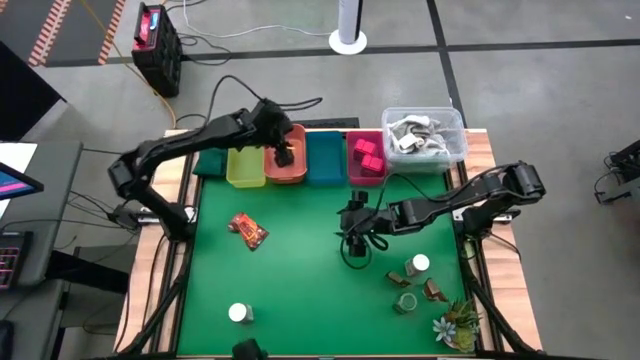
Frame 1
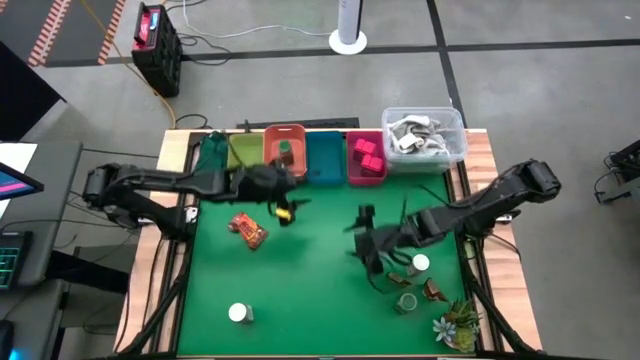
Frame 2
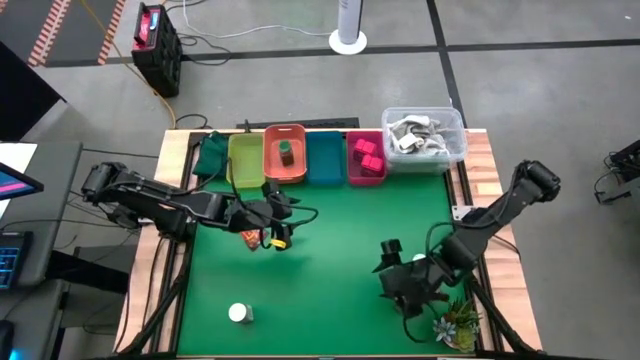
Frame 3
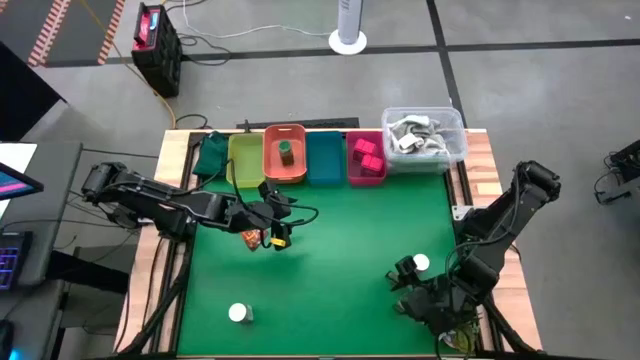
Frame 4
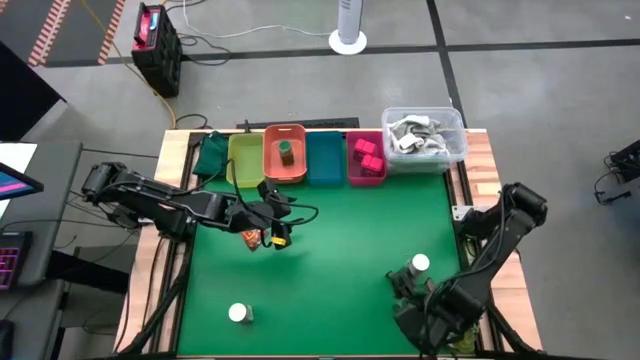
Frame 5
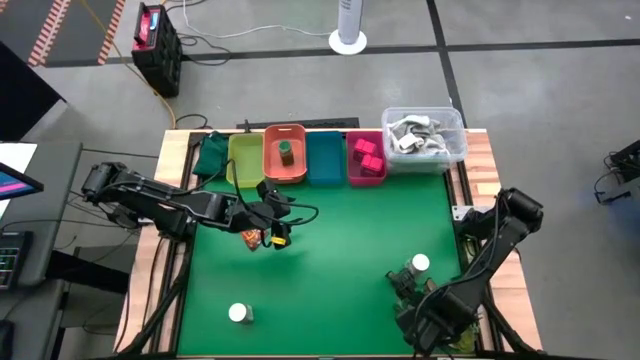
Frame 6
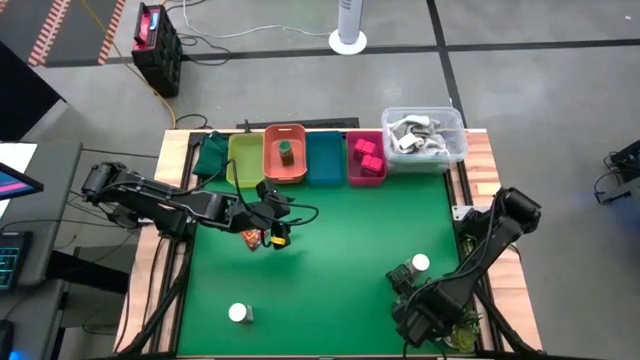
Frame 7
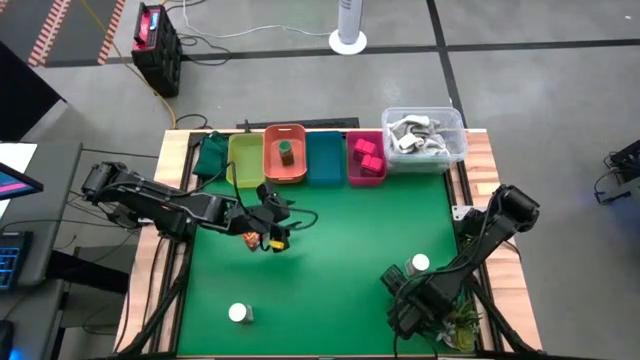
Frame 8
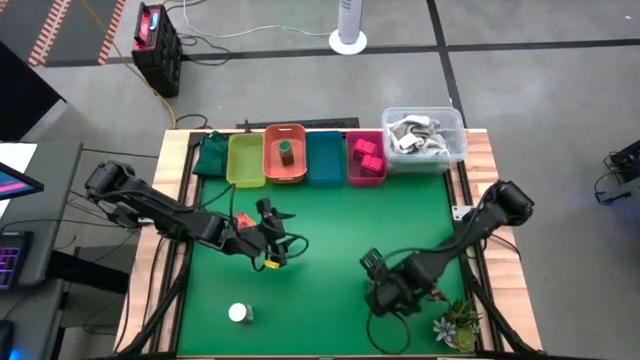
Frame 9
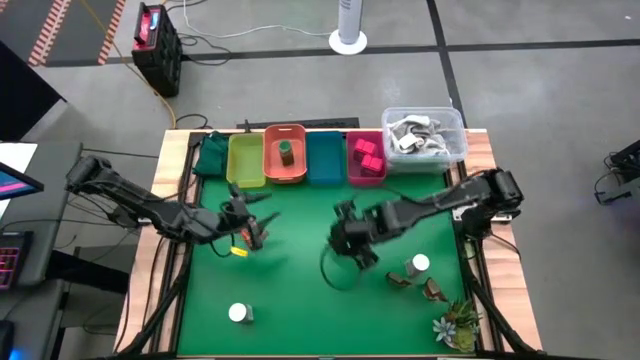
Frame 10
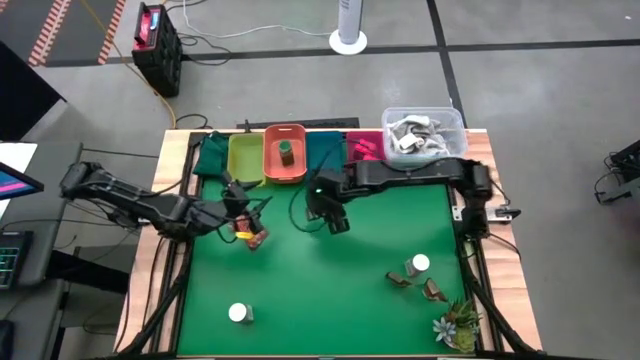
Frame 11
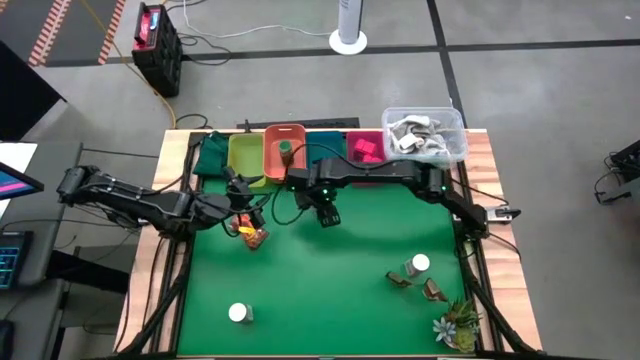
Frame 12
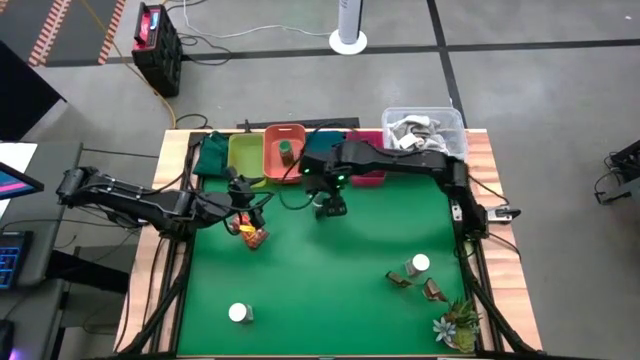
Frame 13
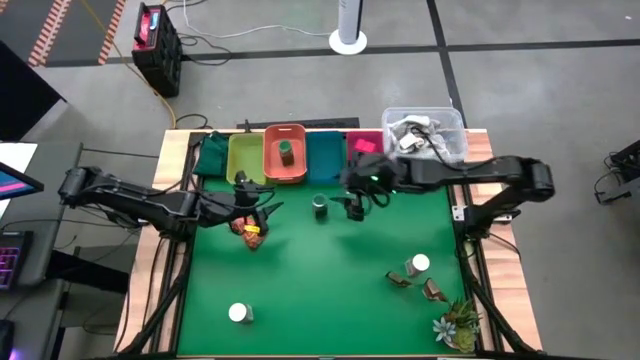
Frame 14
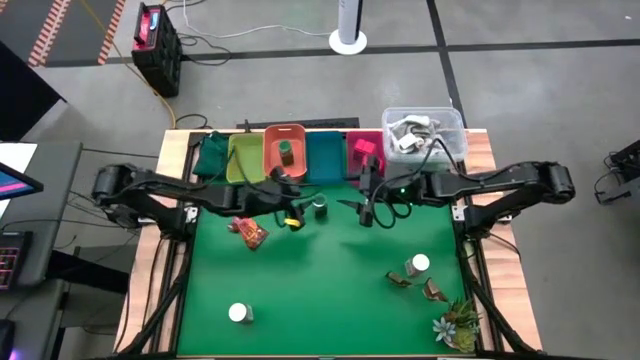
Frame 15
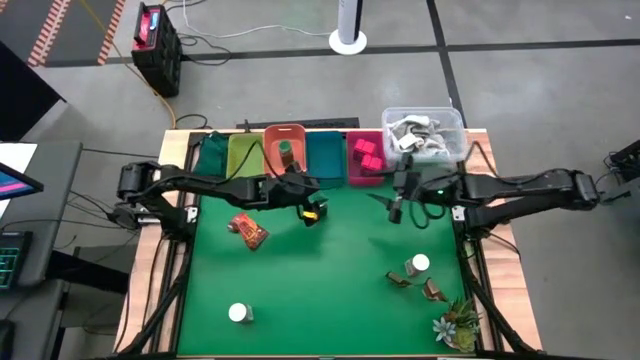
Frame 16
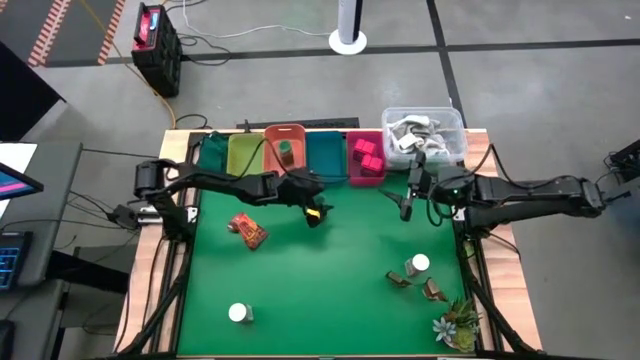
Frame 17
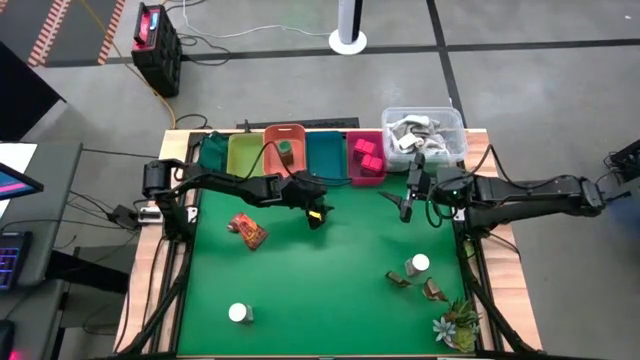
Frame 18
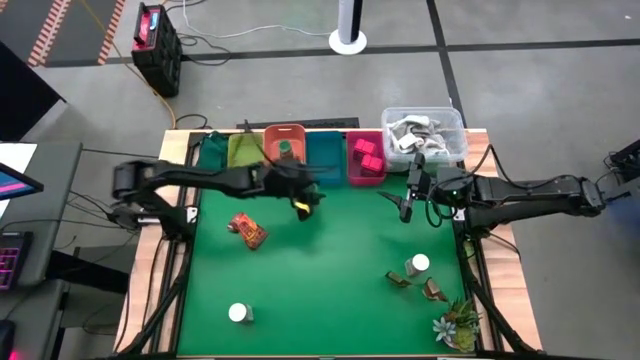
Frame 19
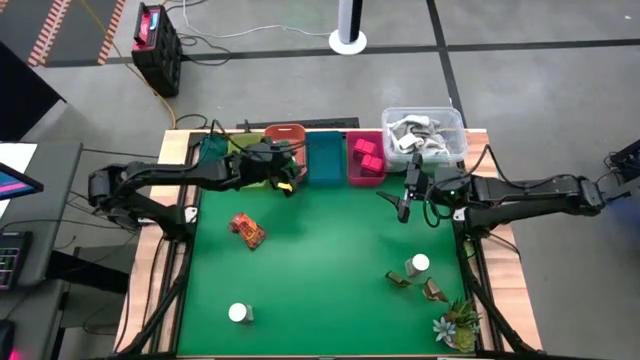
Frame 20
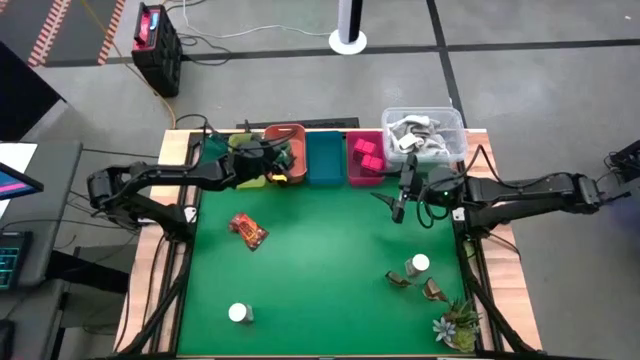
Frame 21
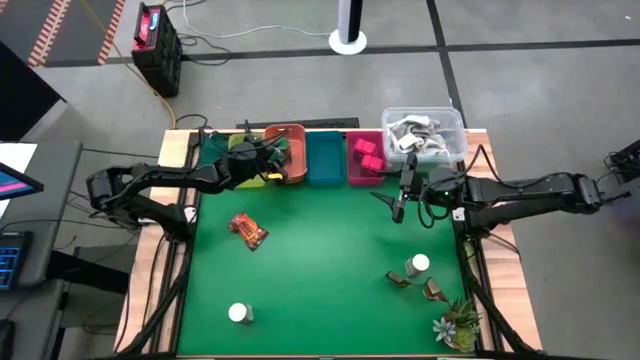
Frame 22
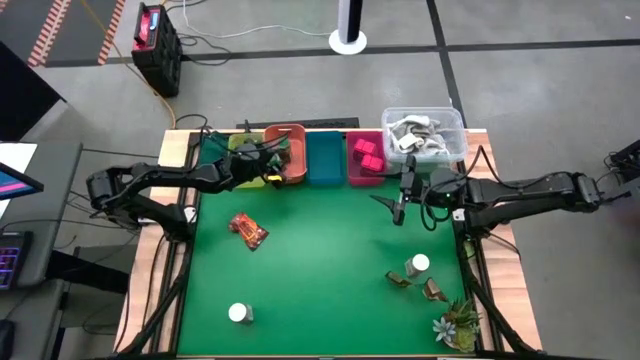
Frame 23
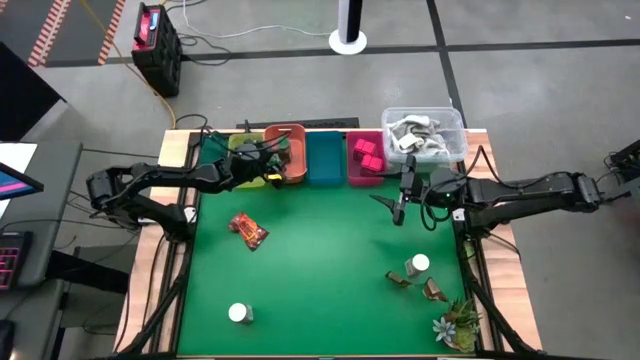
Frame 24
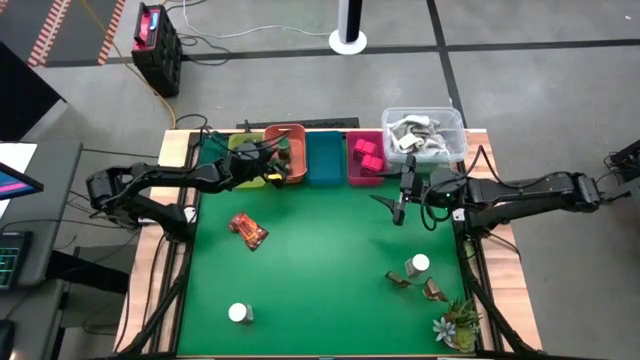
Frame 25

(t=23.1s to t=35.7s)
Task: Sort spices by type
Put the green spice bottle into the orange bin

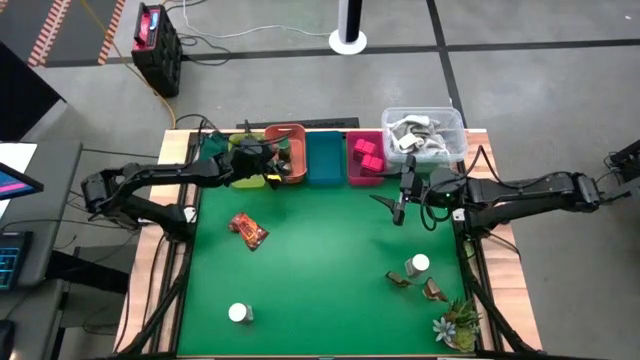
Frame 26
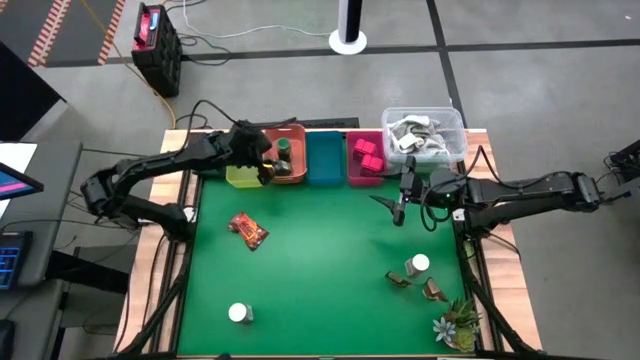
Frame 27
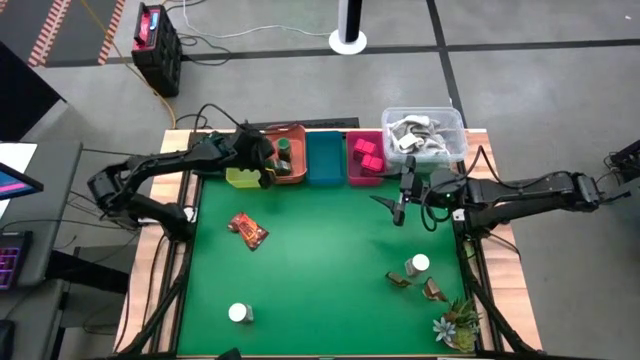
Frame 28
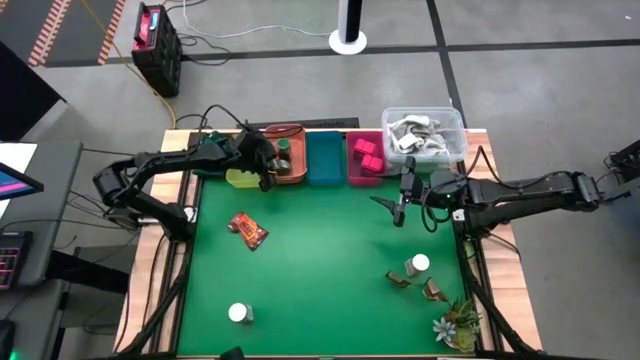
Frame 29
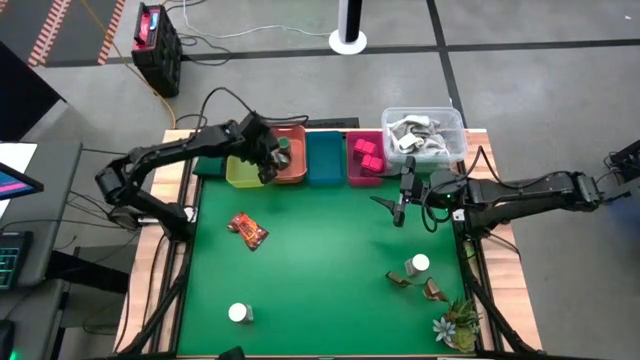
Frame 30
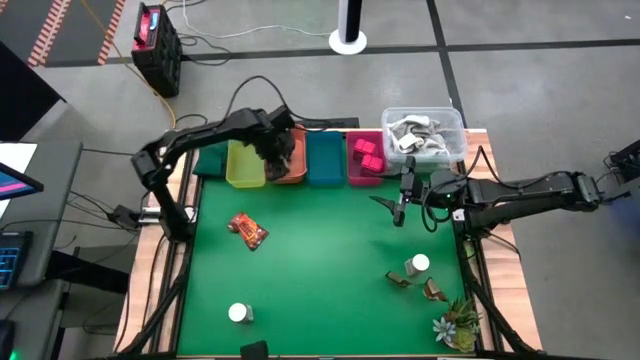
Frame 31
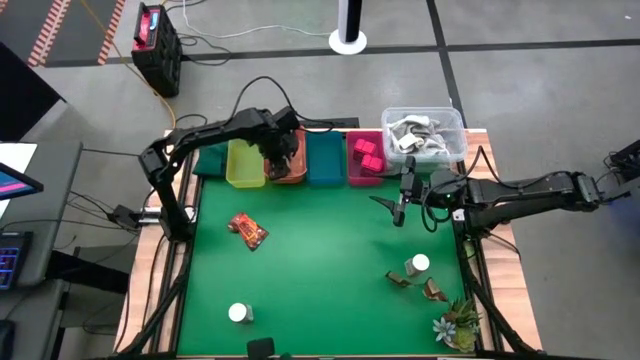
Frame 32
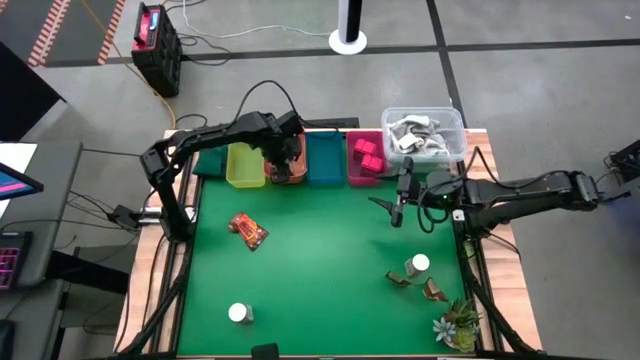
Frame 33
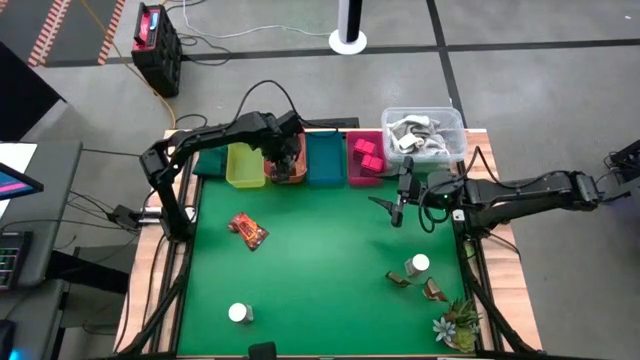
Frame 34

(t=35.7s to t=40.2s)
Put the green spice bottle into the orange bin

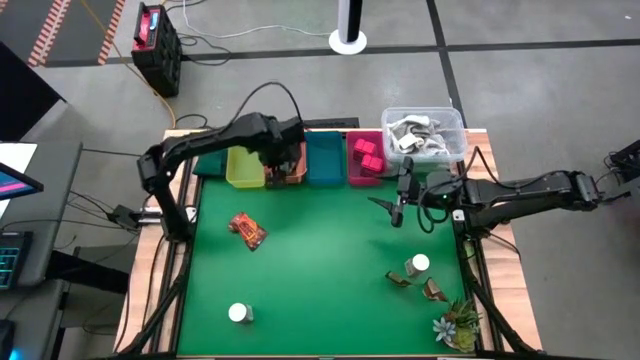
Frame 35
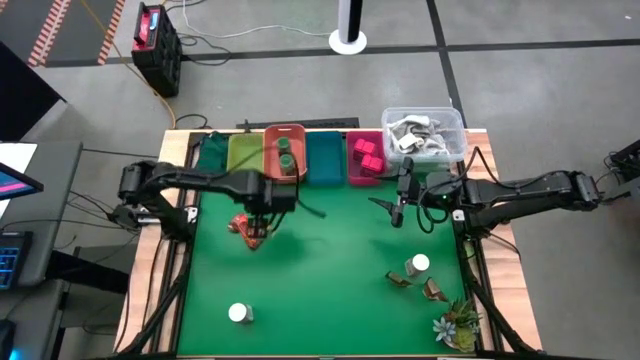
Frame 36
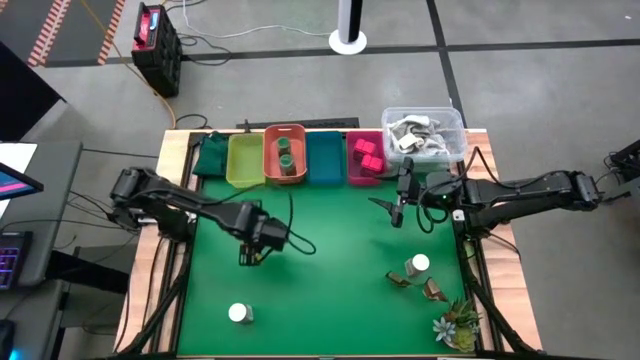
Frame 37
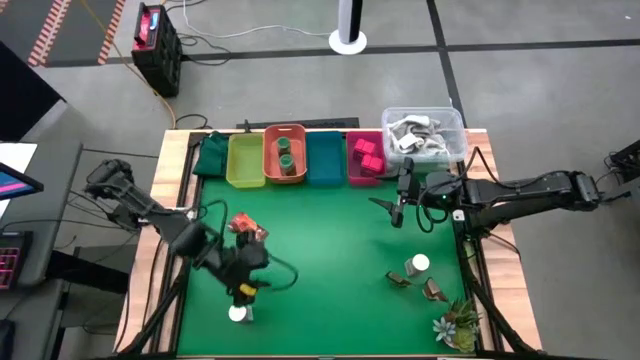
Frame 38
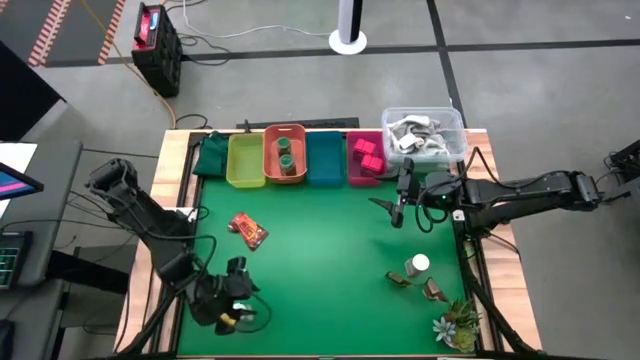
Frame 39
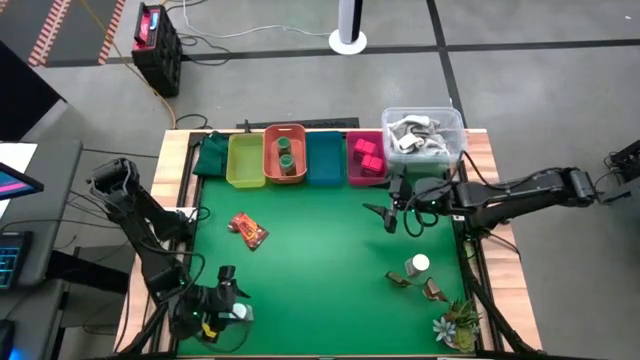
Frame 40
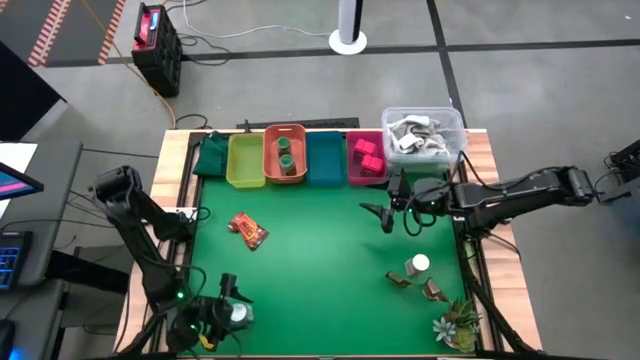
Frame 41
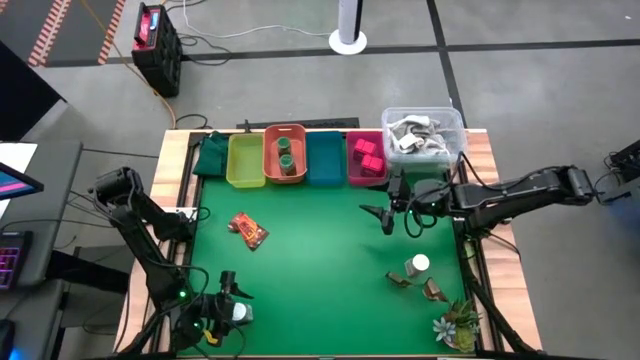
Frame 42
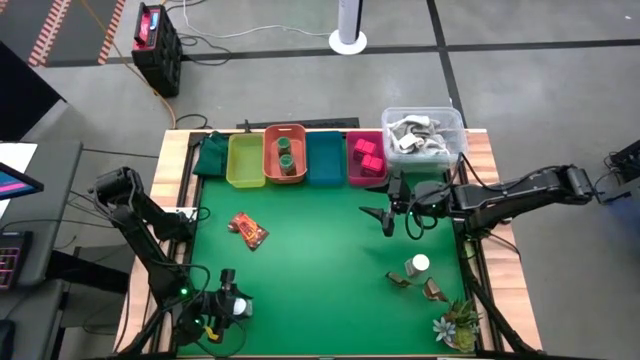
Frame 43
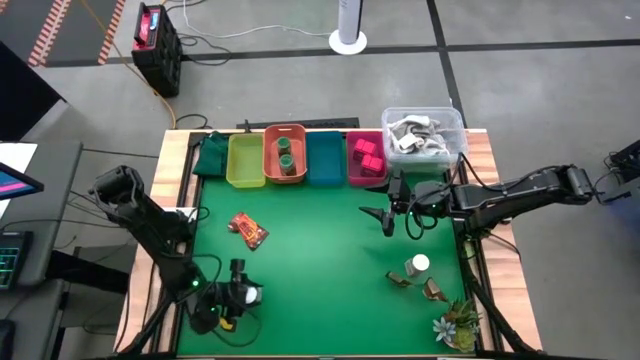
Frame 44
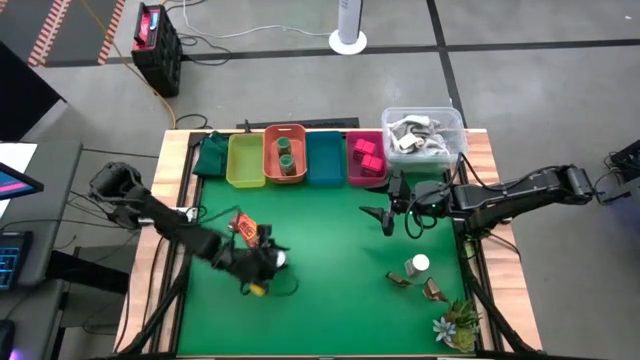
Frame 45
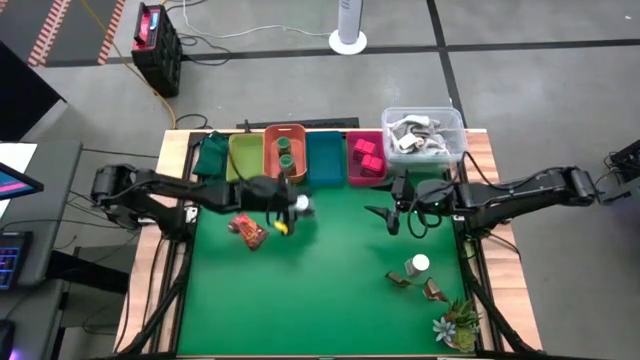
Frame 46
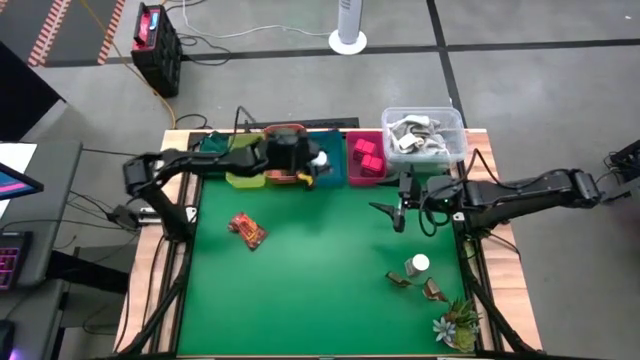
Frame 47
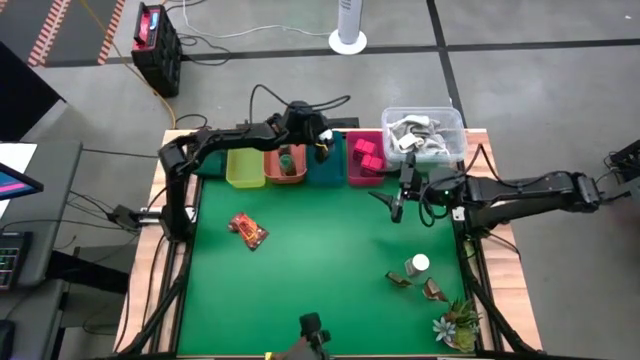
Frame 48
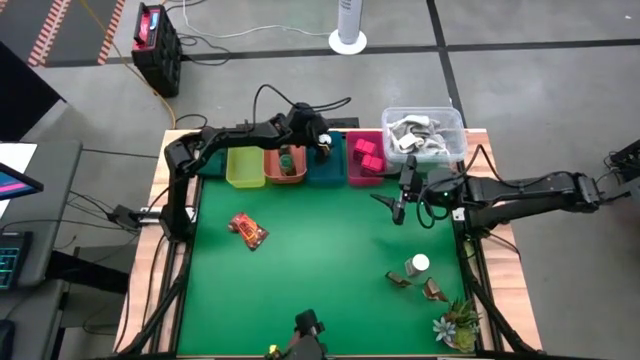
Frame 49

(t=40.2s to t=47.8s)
Put the left white spice bottle into the blue bin
